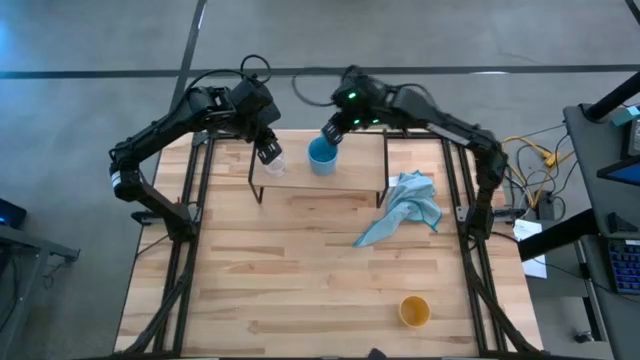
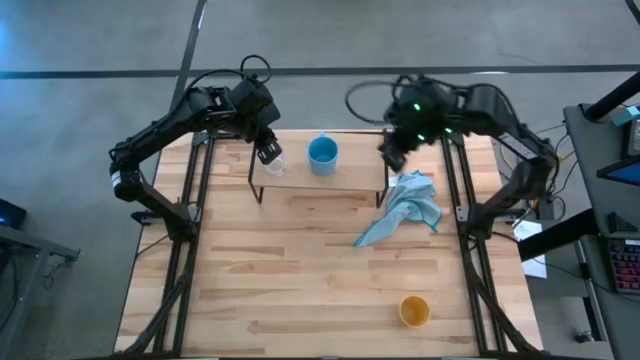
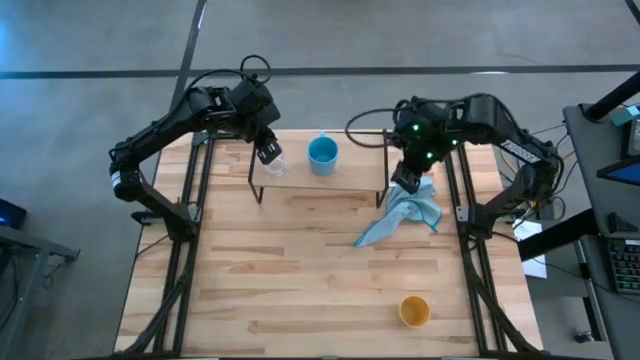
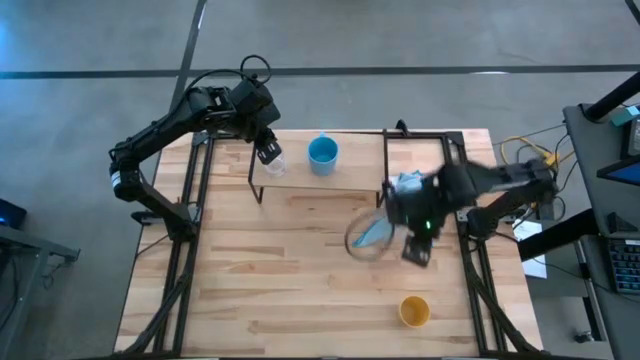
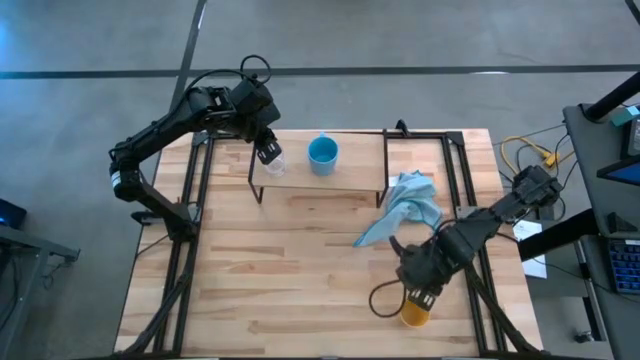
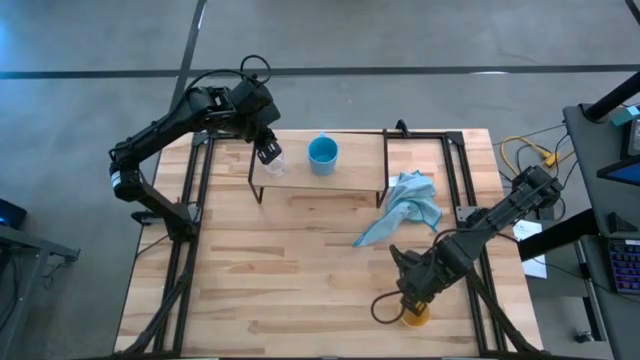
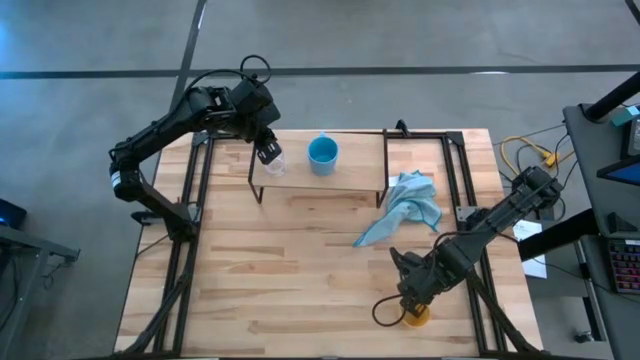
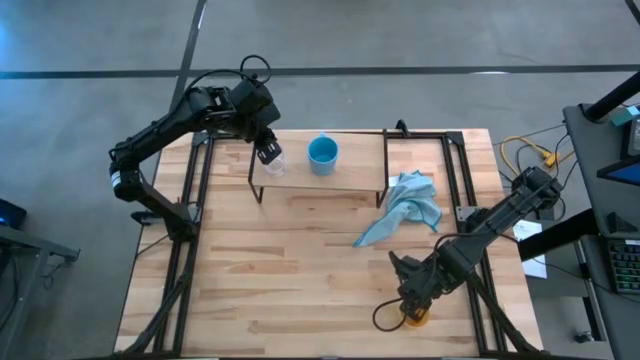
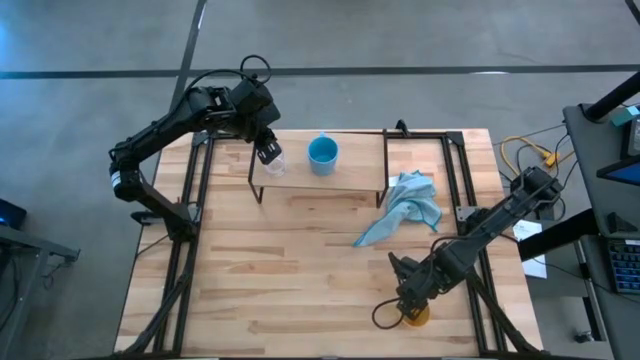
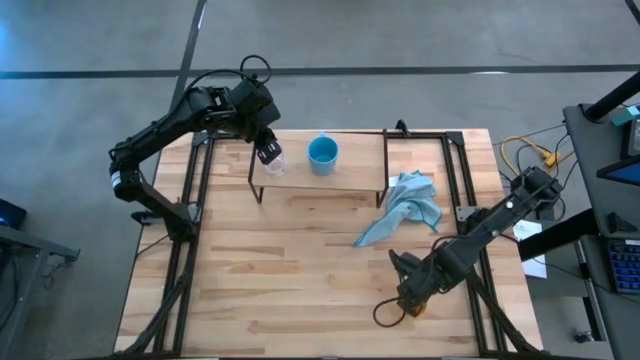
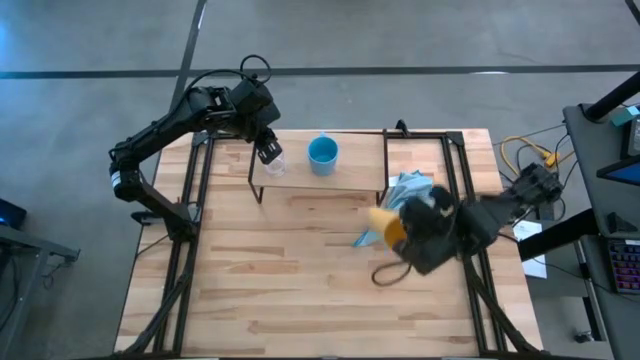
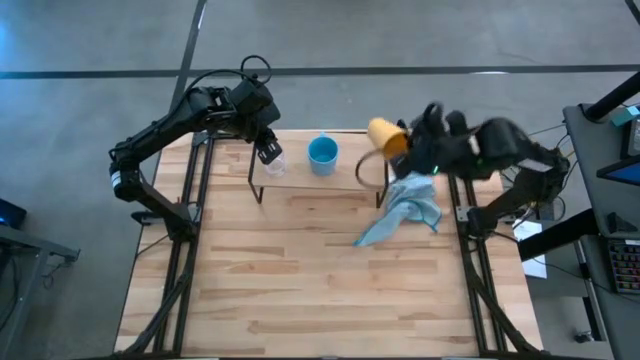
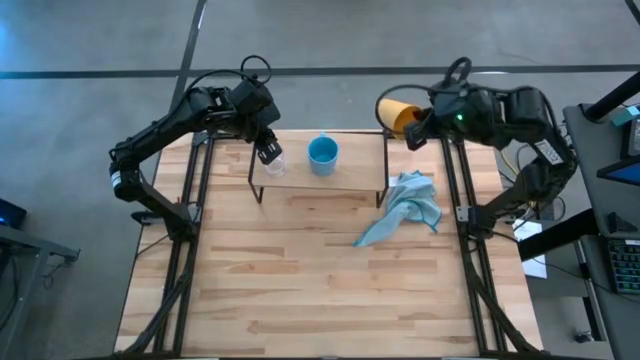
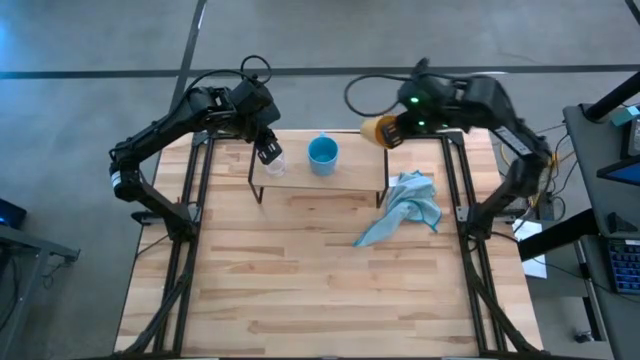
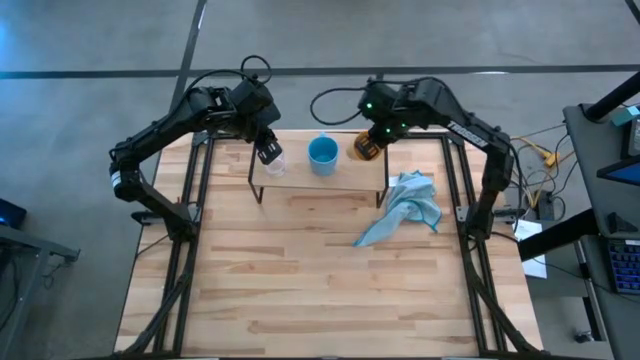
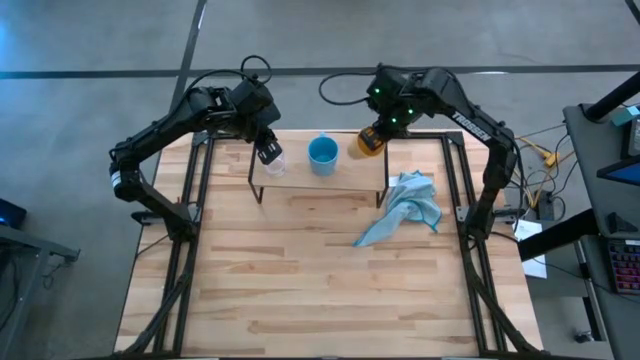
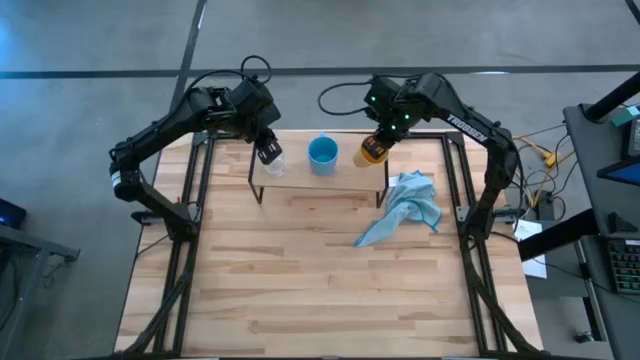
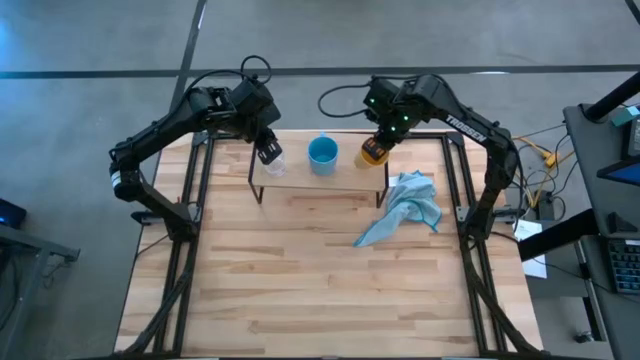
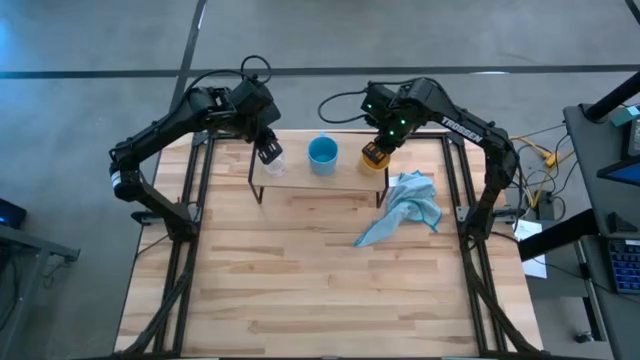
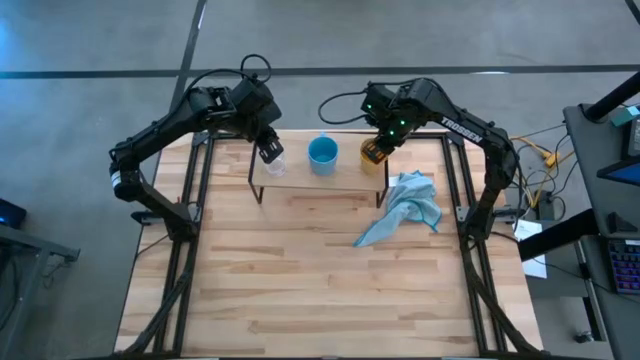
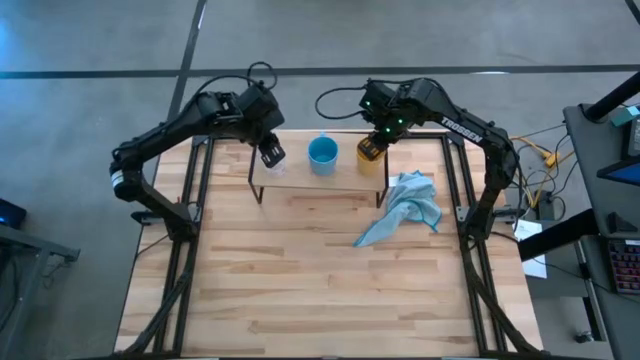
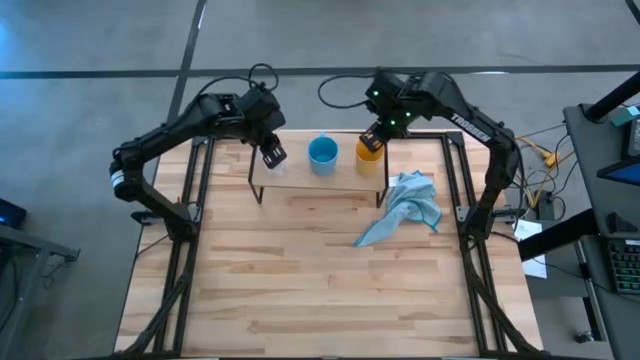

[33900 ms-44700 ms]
Task: Stack small to large cups/mugs on shelf
Put the yellow cup on the shelf

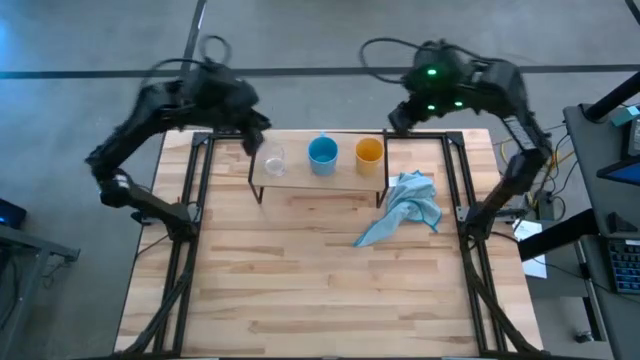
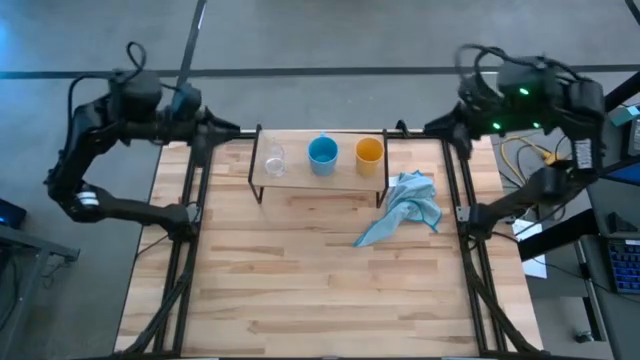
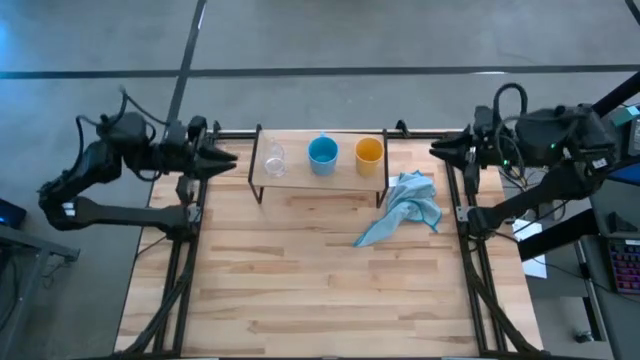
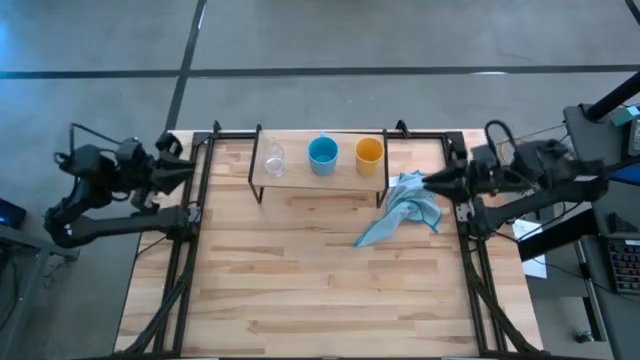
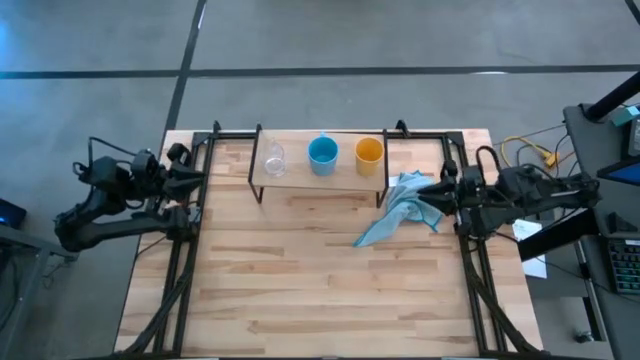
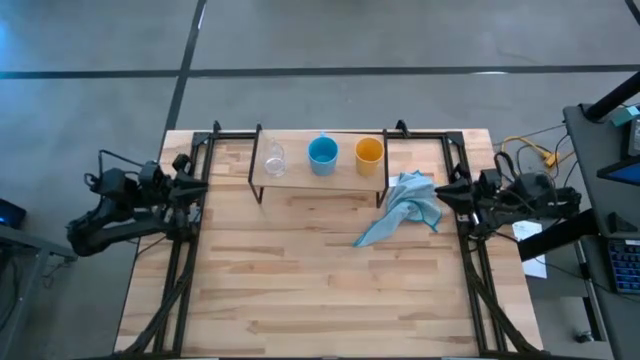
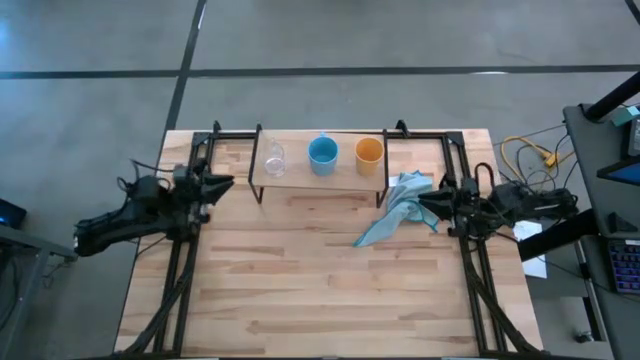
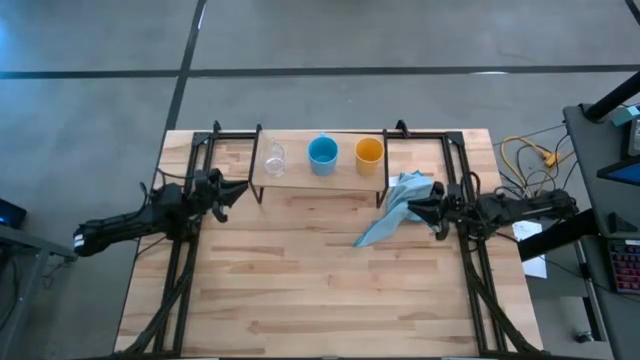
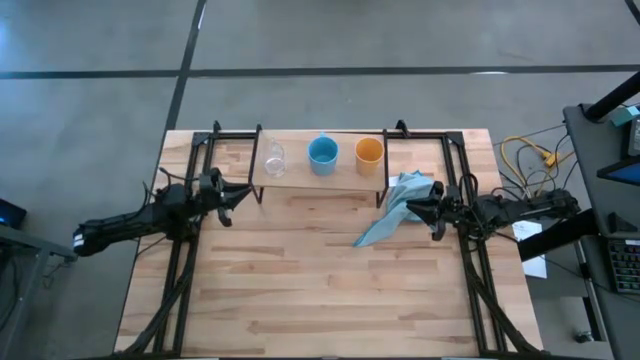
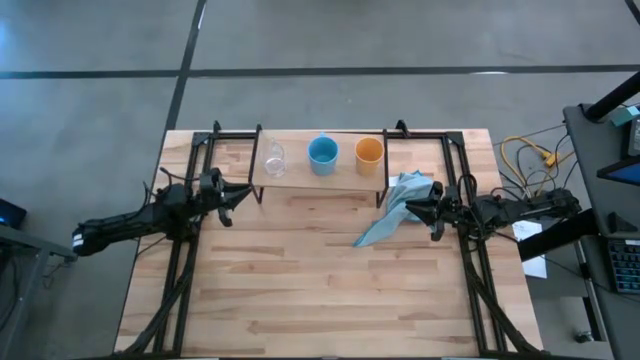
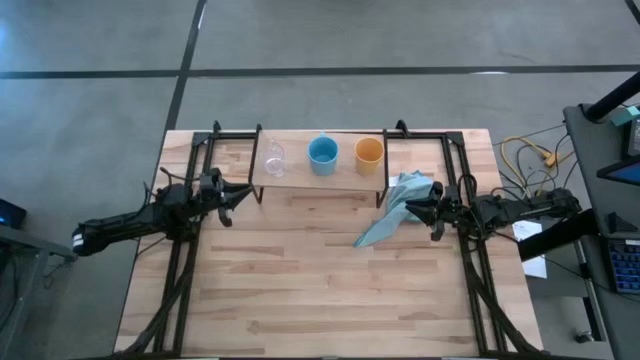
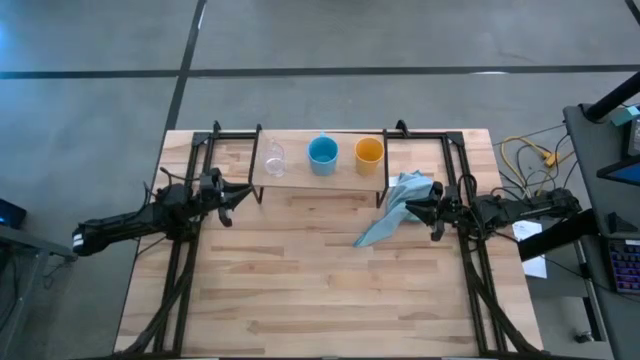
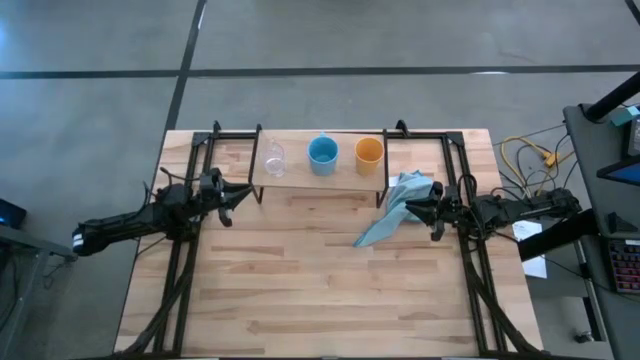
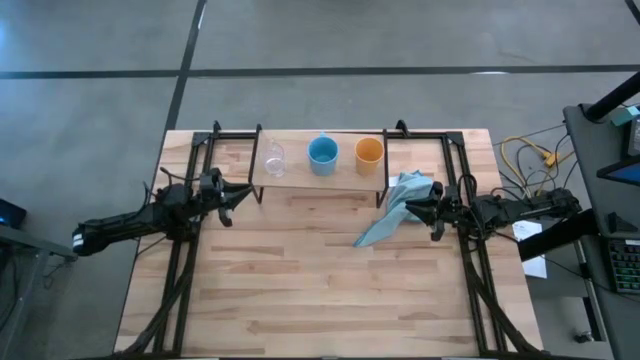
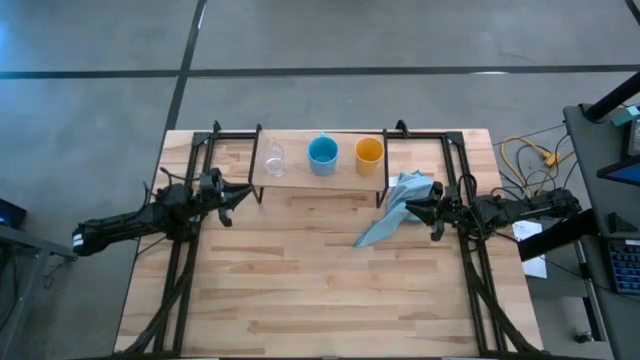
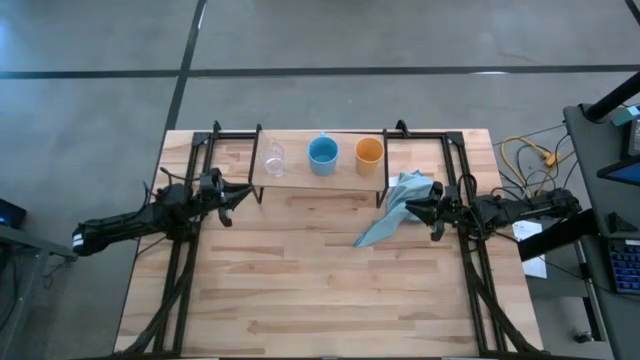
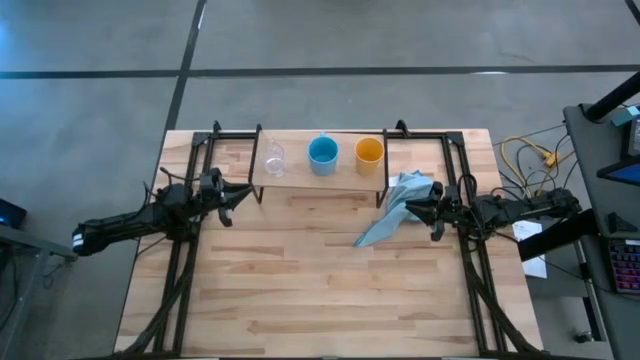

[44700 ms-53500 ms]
Return to Home Position

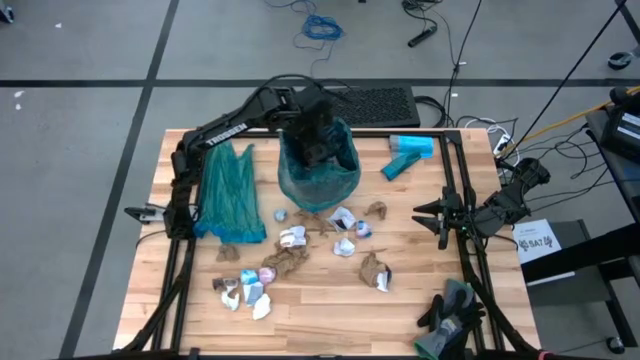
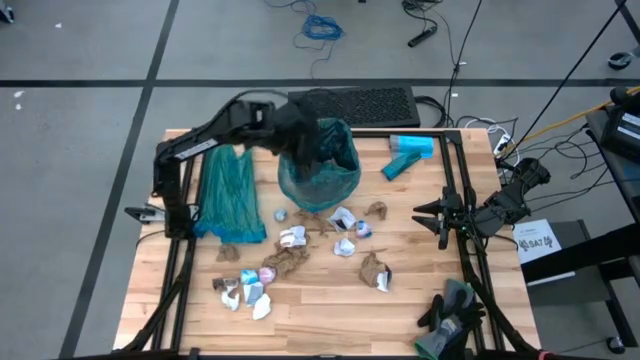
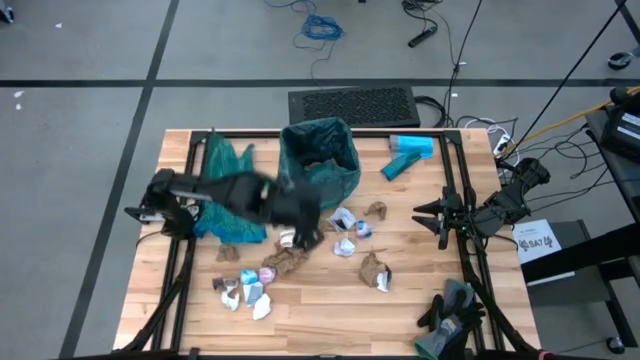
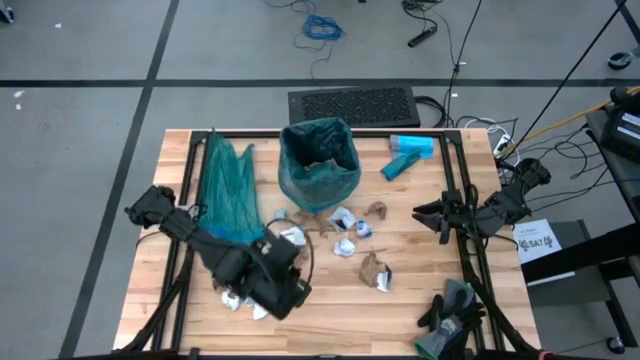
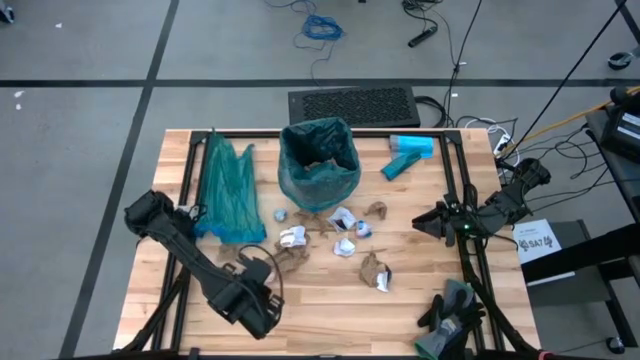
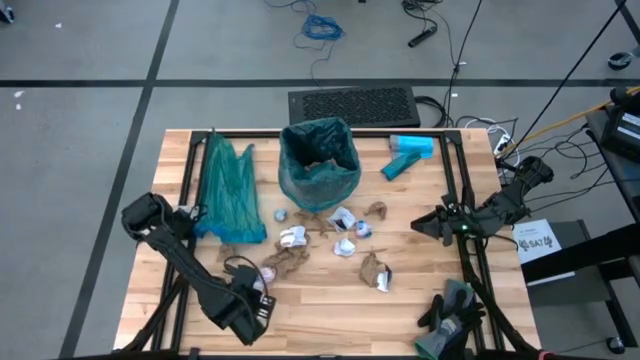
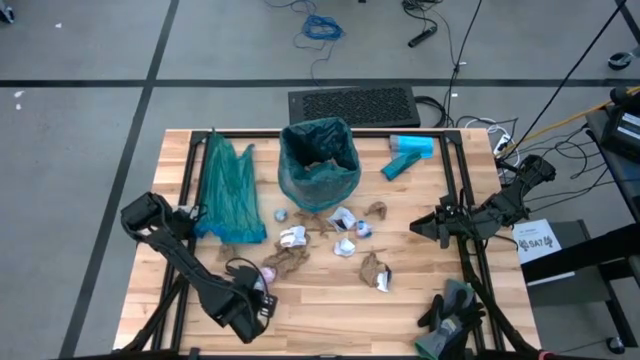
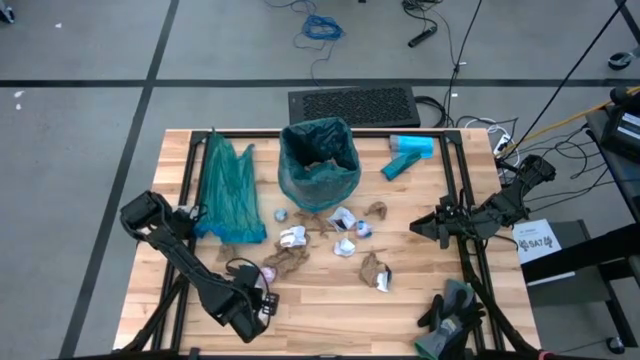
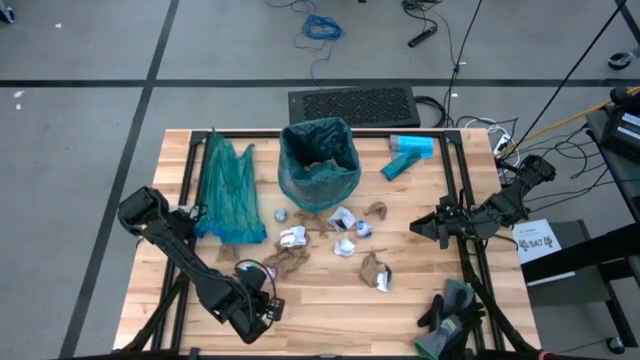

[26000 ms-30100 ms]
Task: place trash/remove bag and relplace
Put the white paper into the blue trash bag inside the black trash bin
